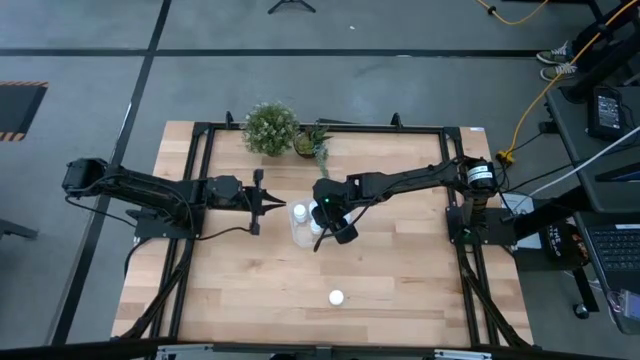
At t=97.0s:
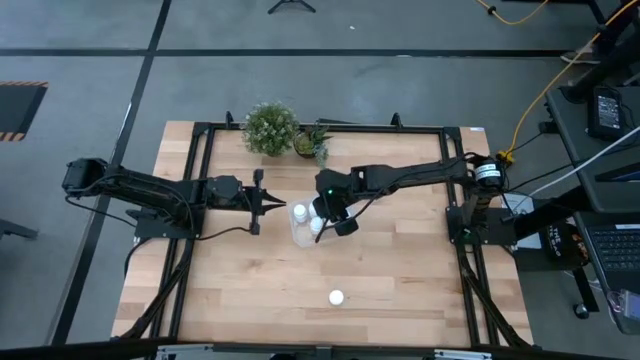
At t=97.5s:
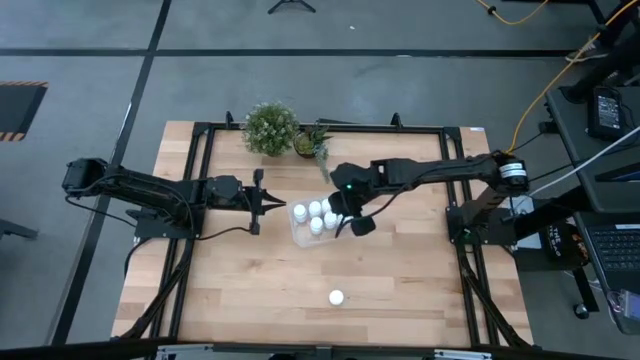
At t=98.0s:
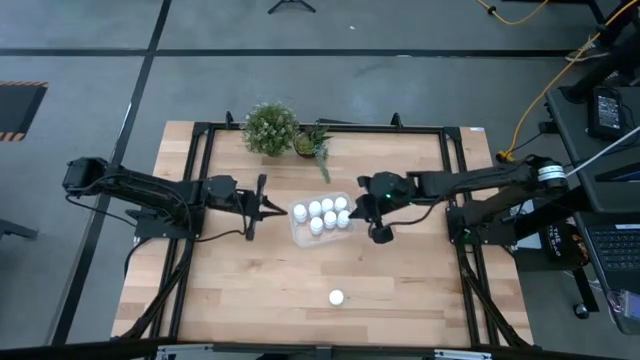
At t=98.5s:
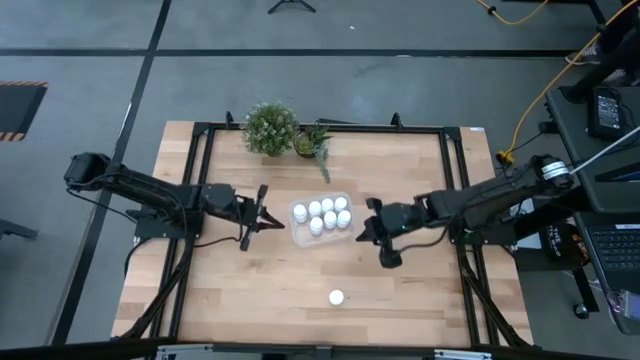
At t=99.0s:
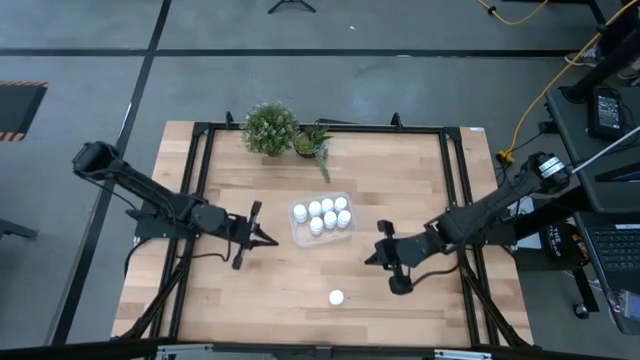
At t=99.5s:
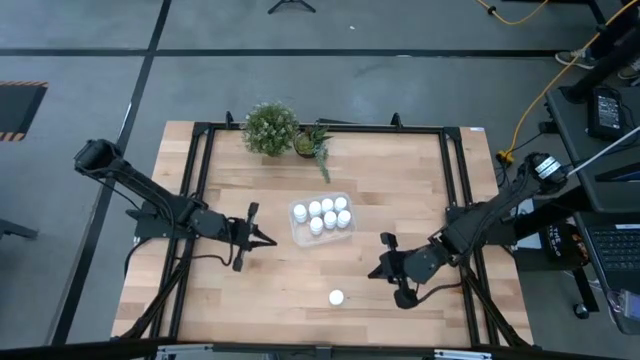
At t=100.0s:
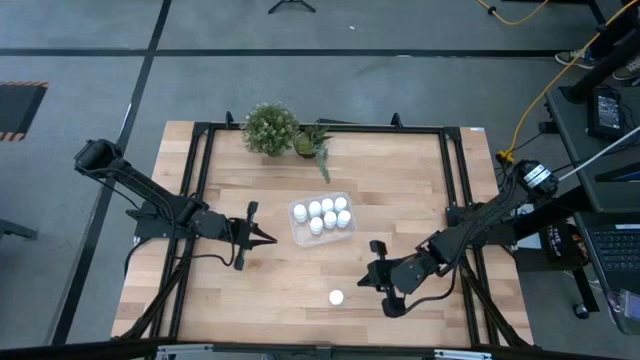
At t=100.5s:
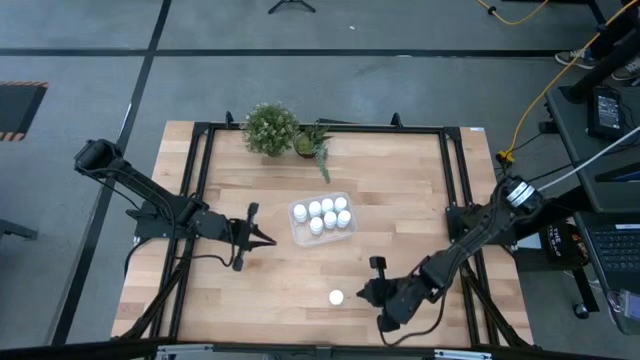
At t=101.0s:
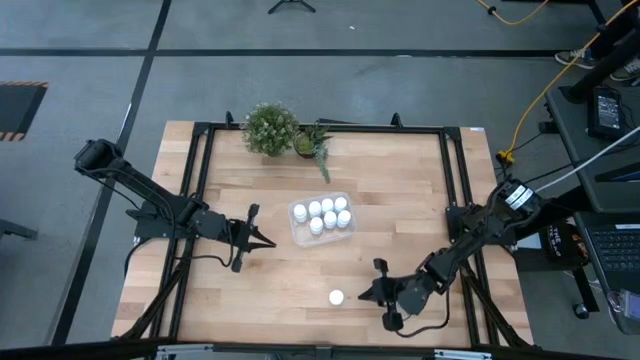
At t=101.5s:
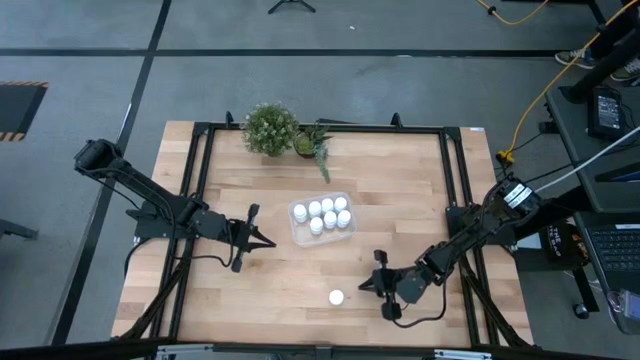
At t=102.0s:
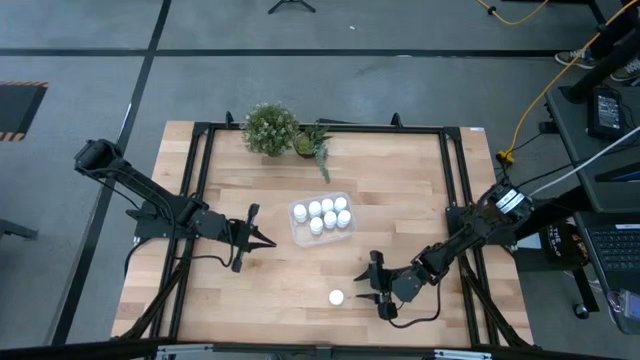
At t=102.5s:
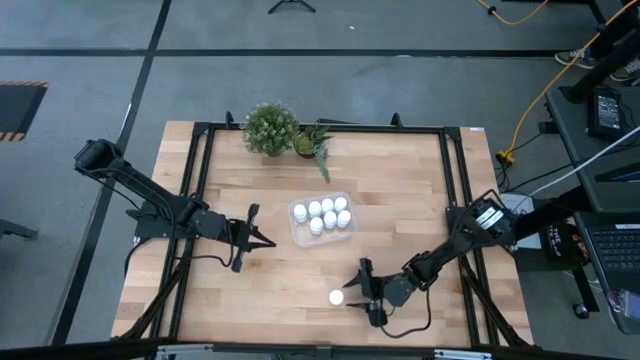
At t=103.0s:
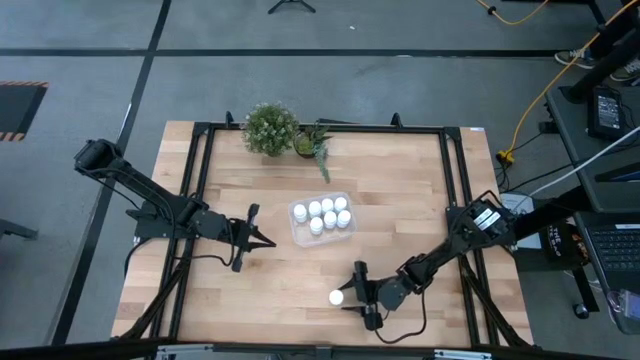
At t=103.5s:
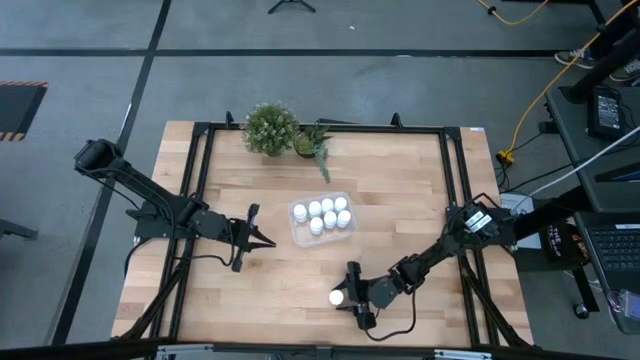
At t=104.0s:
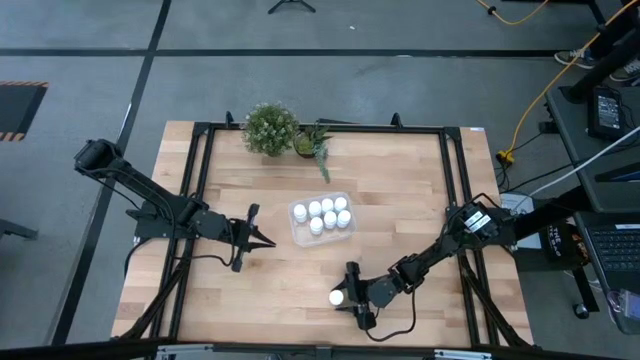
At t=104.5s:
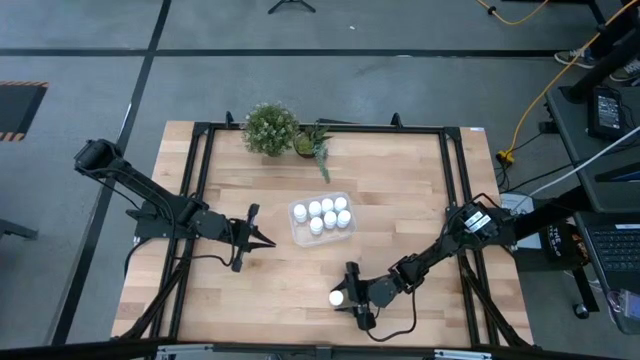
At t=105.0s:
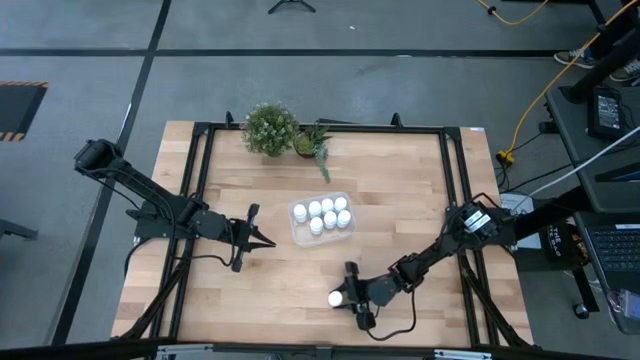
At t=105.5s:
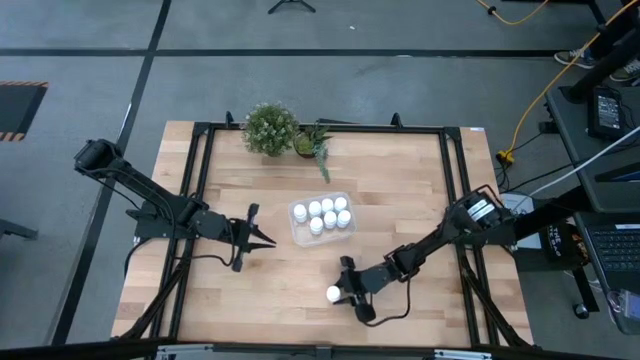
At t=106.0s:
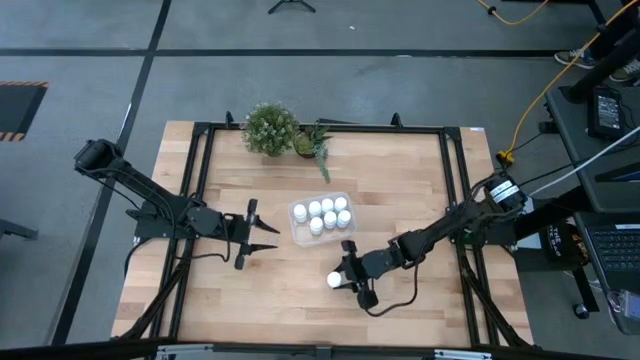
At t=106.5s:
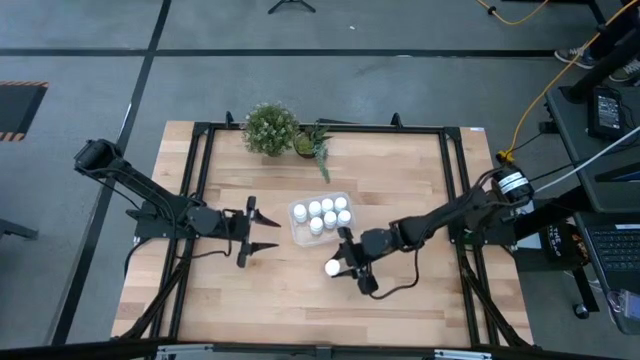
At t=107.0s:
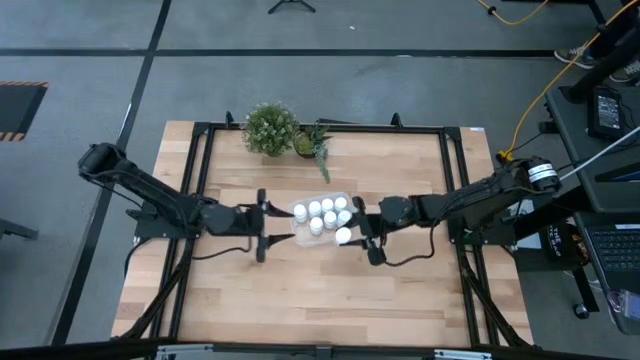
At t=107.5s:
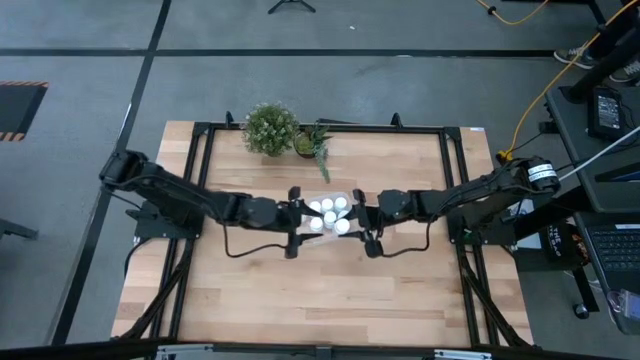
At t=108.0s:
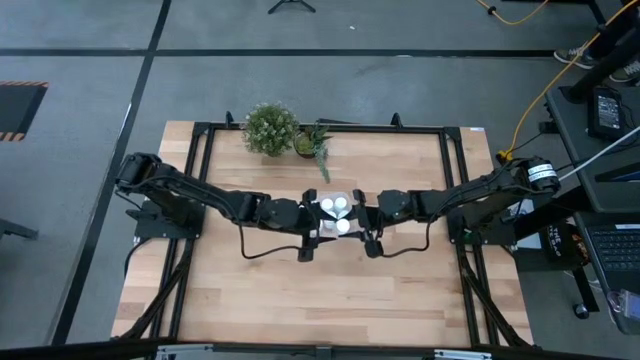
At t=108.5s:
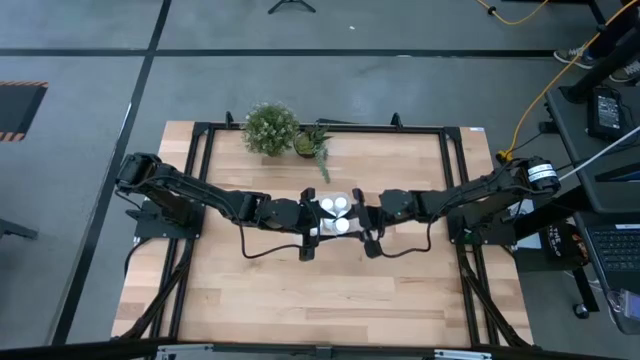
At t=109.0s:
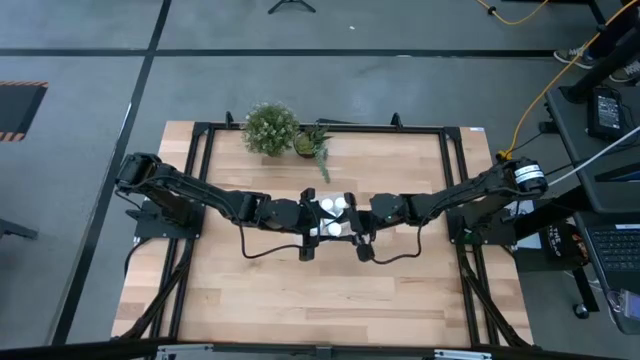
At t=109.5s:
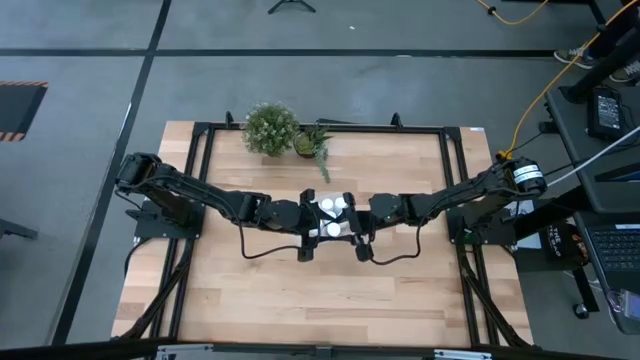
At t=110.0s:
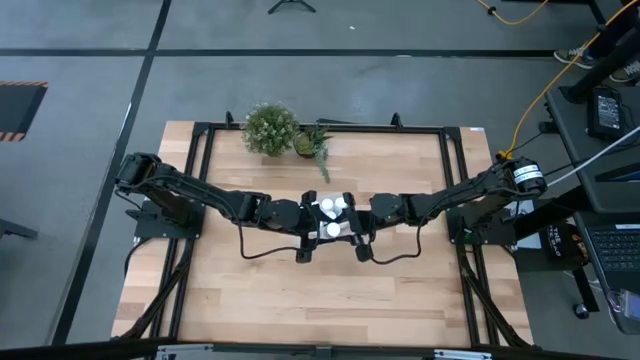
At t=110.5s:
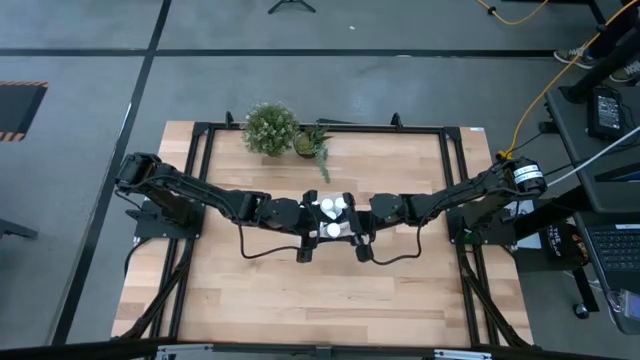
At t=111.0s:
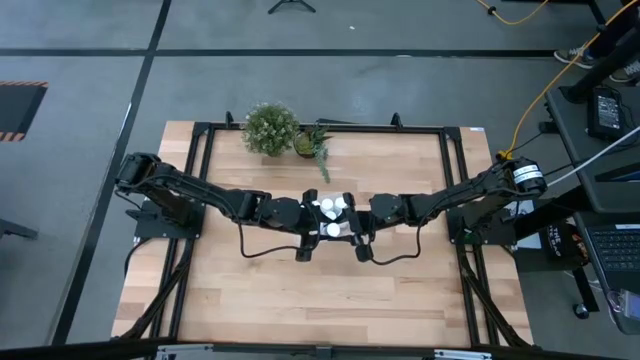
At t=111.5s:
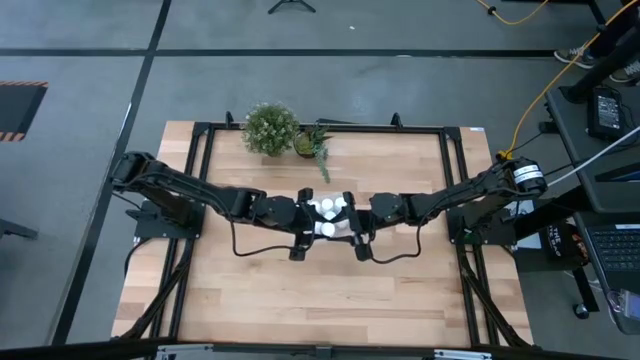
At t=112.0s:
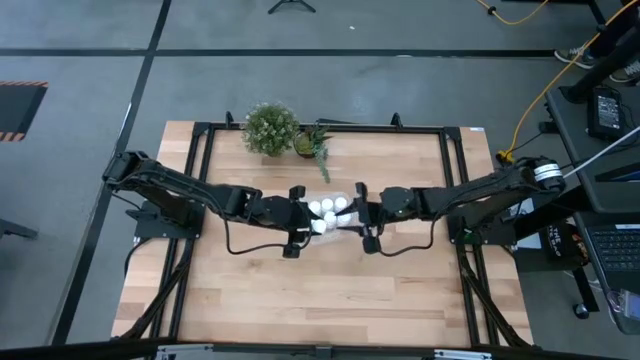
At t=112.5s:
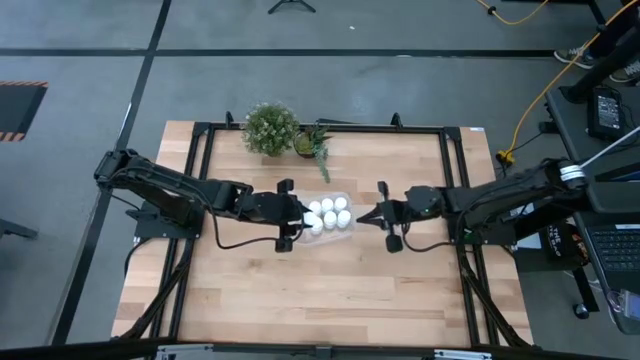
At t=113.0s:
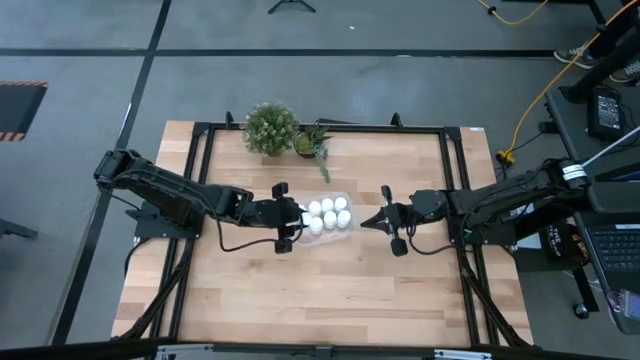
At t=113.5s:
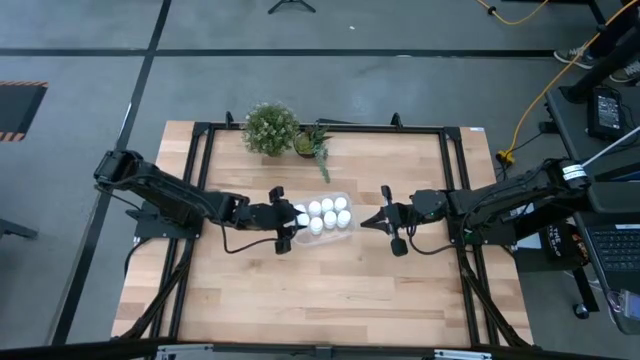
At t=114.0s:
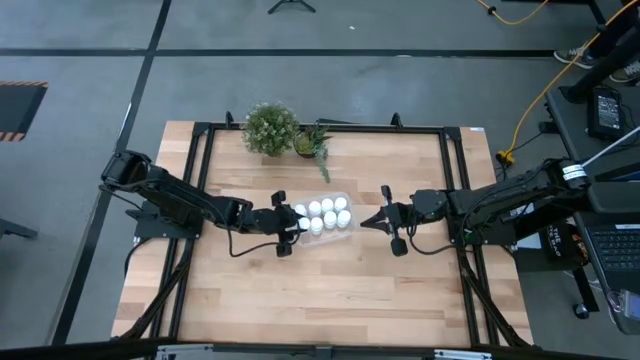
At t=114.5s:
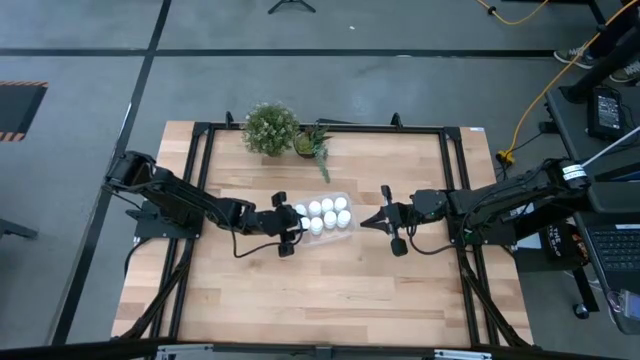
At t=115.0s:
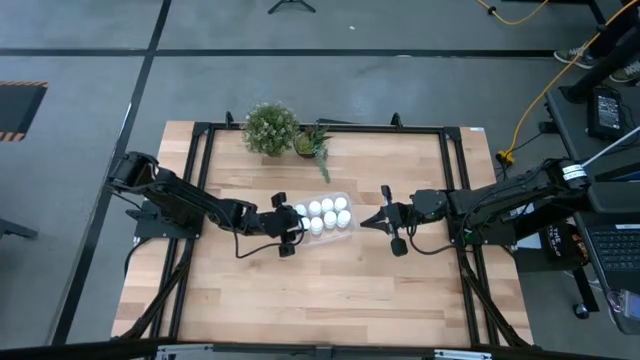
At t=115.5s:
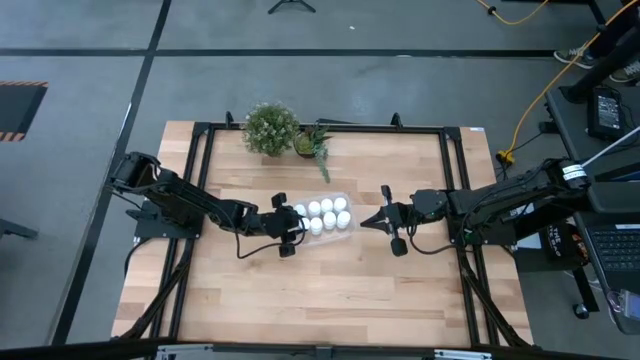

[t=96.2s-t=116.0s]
Task: Pick and place pill bottles into a basket
Put the white pill bottle into the transparent bin

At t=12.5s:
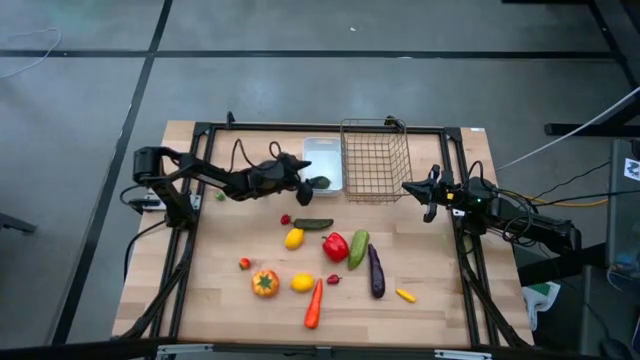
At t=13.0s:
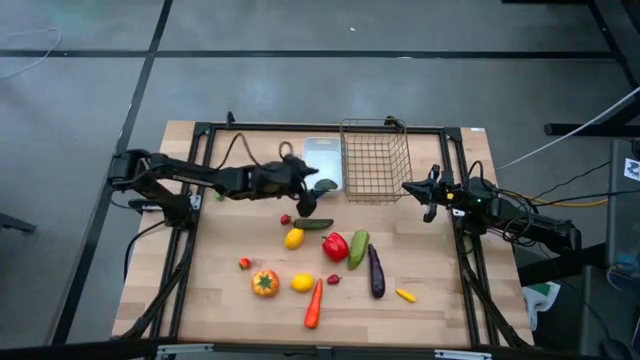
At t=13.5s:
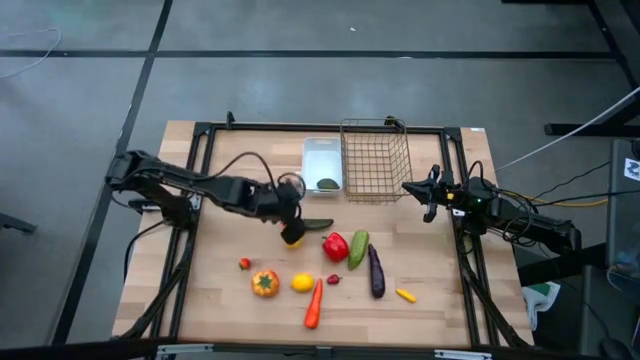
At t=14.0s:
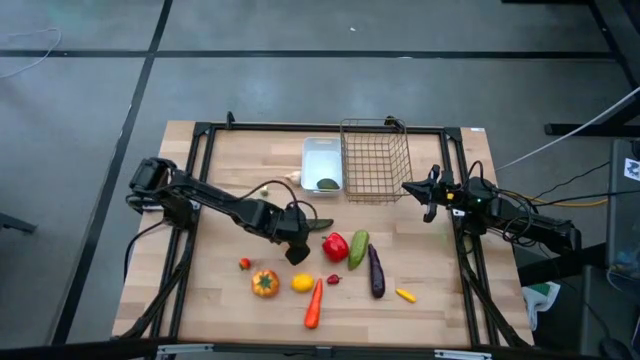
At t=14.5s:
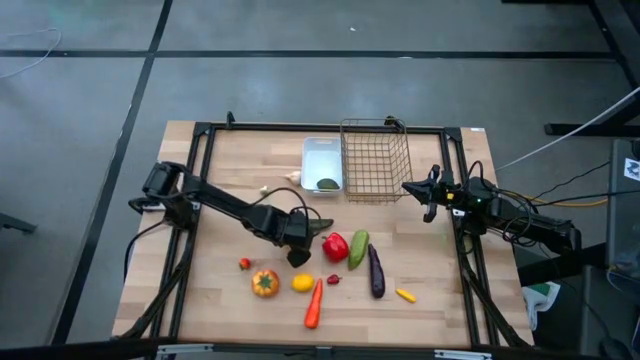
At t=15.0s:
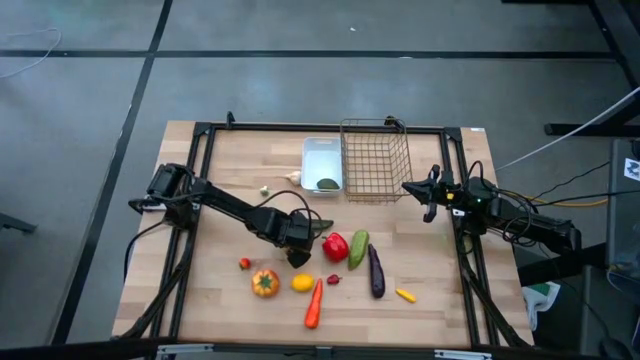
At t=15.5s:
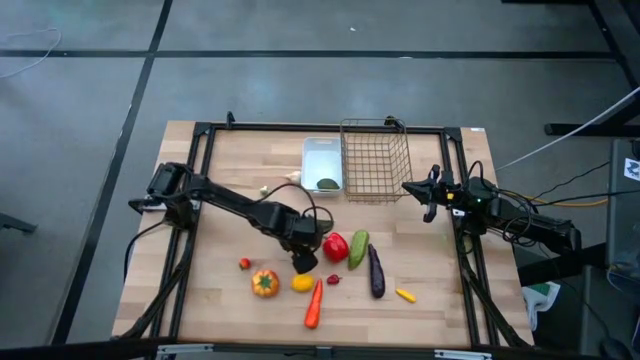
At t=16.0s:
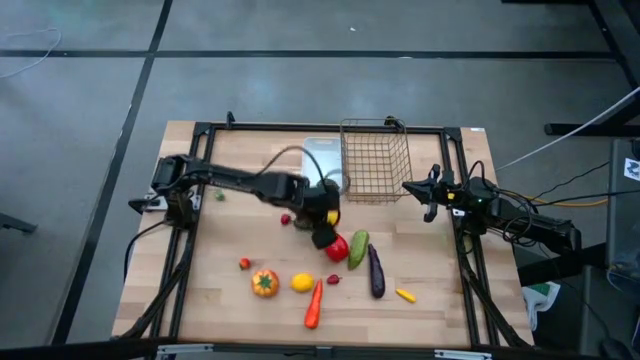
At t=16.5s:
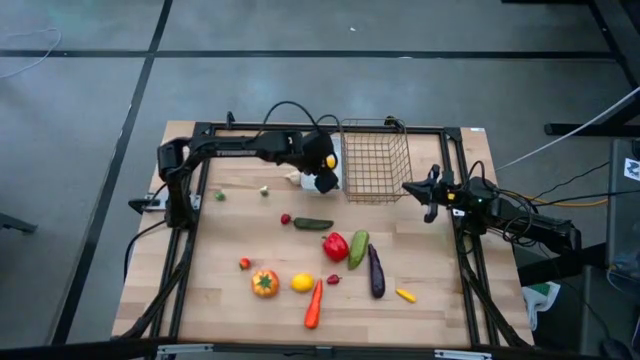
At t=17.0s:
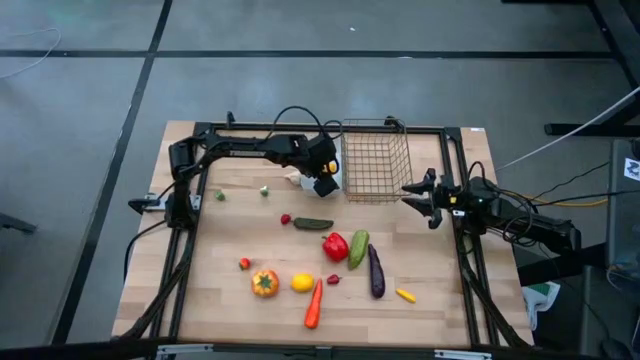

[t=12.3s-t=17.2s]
Task: Sort produce into baskets
Put the yellow lemon into the white bin
